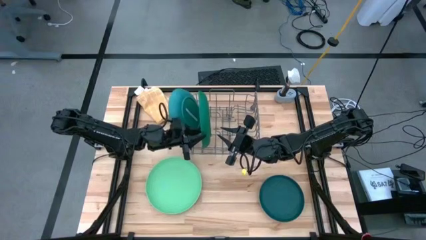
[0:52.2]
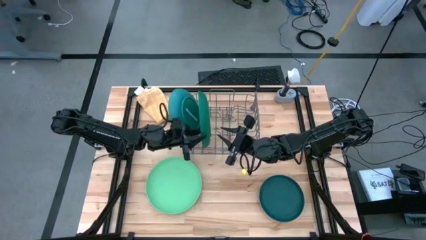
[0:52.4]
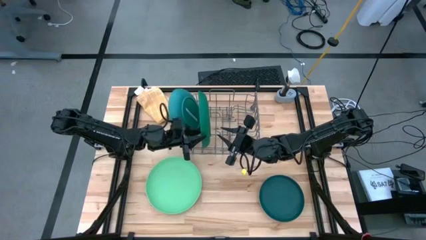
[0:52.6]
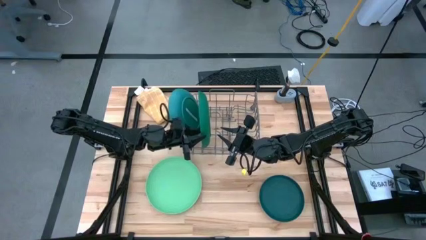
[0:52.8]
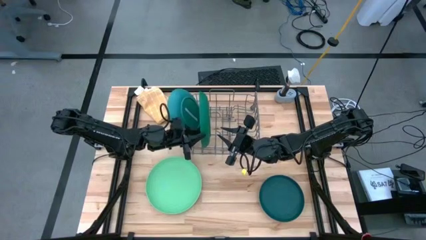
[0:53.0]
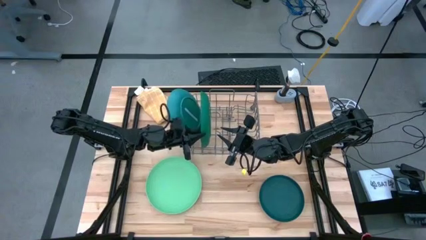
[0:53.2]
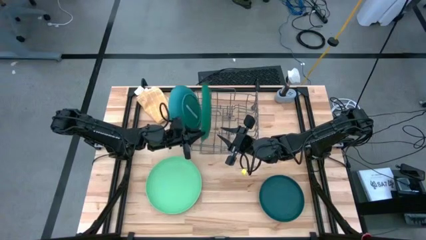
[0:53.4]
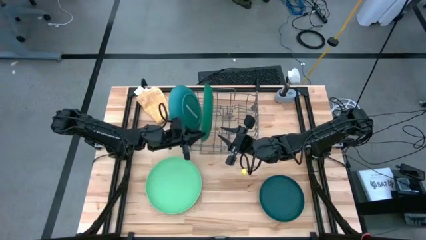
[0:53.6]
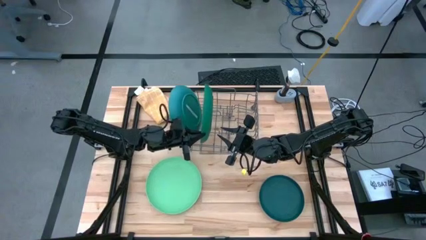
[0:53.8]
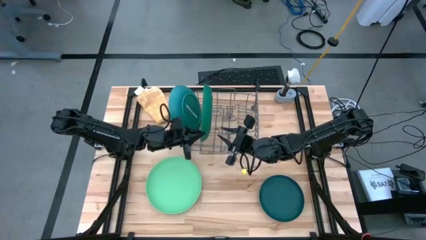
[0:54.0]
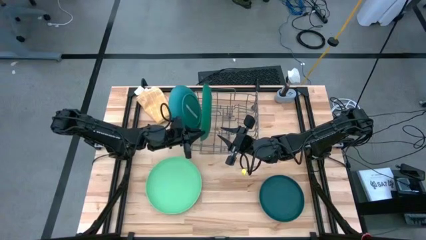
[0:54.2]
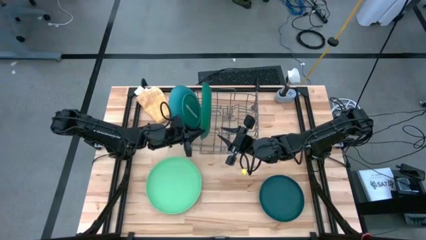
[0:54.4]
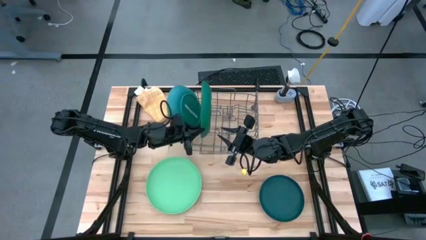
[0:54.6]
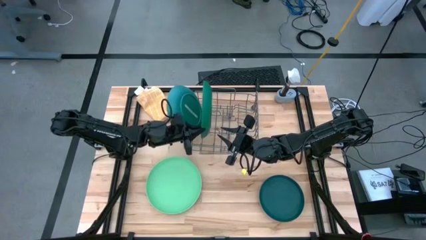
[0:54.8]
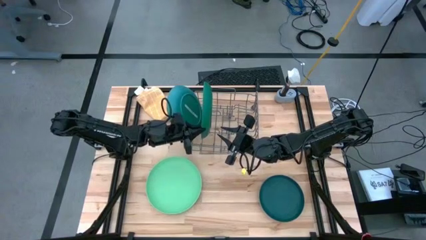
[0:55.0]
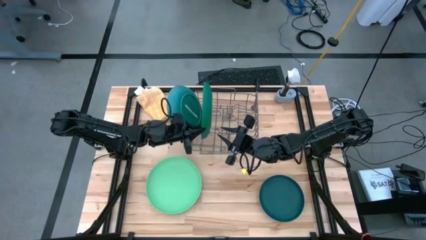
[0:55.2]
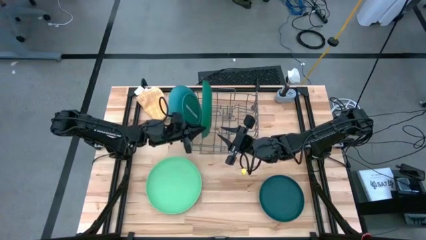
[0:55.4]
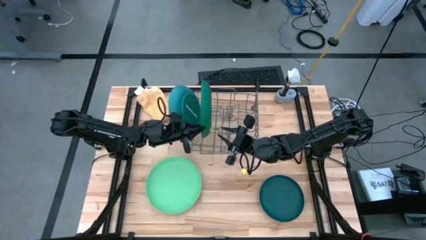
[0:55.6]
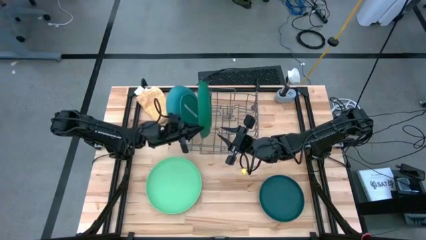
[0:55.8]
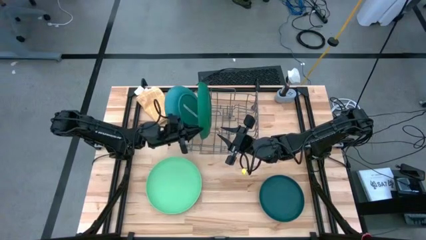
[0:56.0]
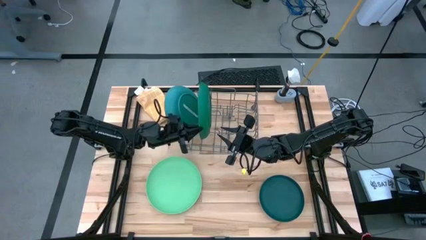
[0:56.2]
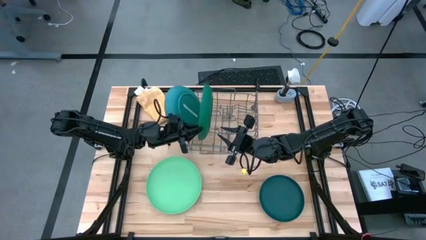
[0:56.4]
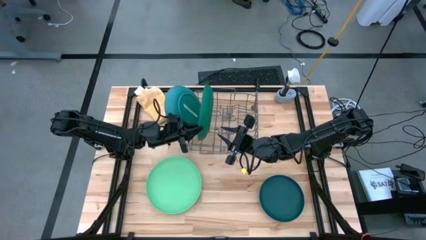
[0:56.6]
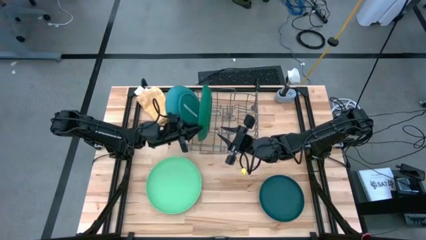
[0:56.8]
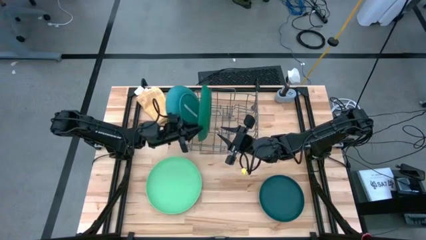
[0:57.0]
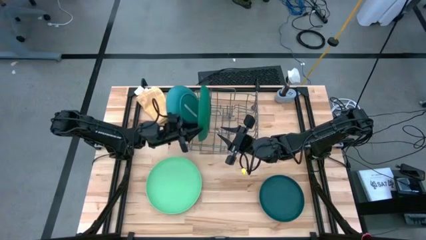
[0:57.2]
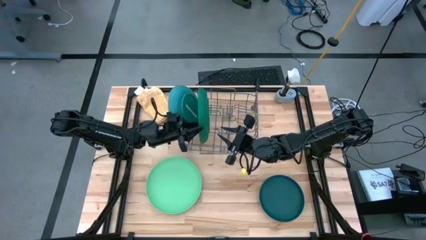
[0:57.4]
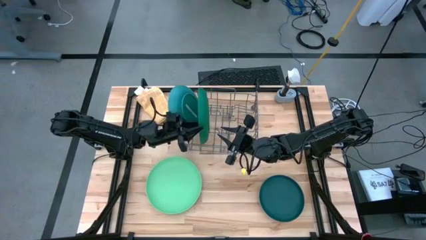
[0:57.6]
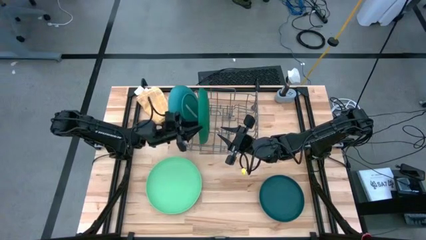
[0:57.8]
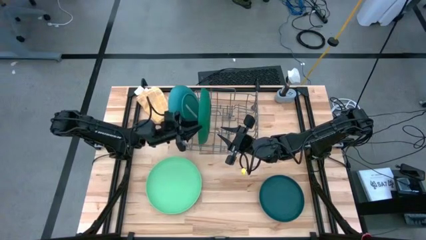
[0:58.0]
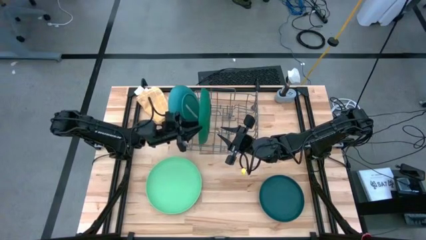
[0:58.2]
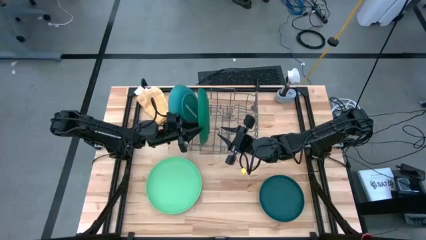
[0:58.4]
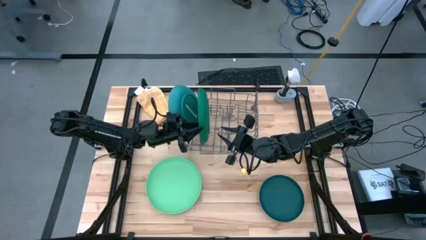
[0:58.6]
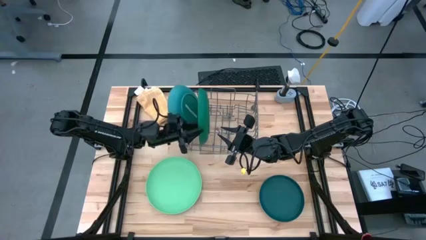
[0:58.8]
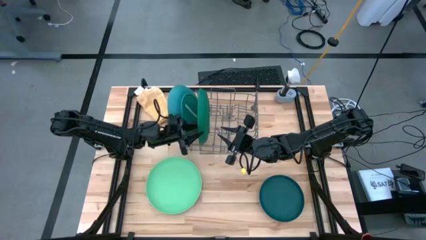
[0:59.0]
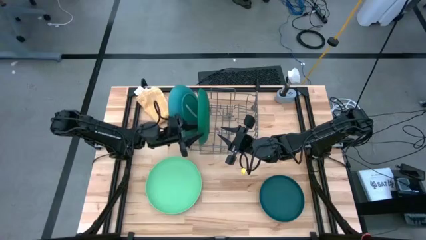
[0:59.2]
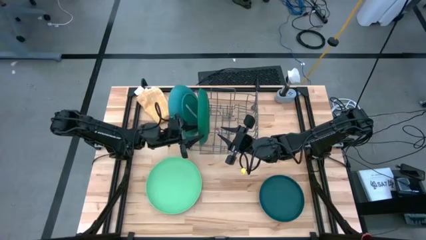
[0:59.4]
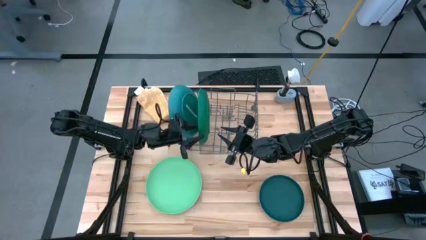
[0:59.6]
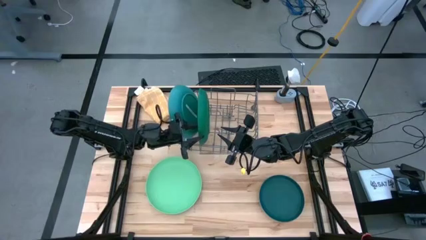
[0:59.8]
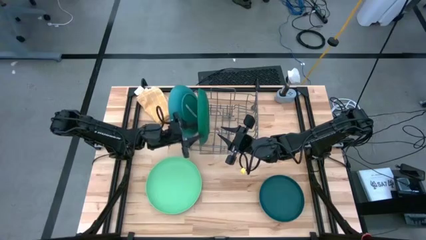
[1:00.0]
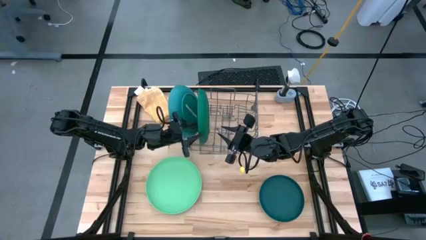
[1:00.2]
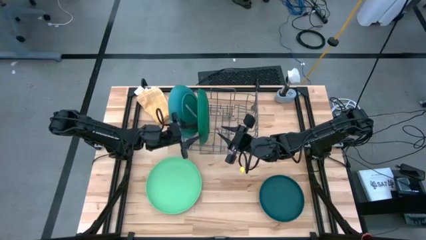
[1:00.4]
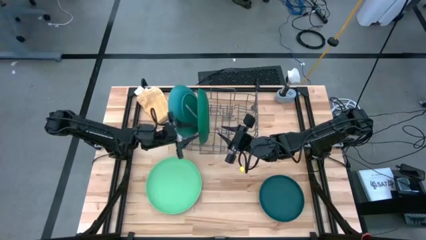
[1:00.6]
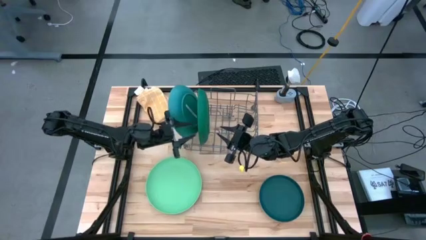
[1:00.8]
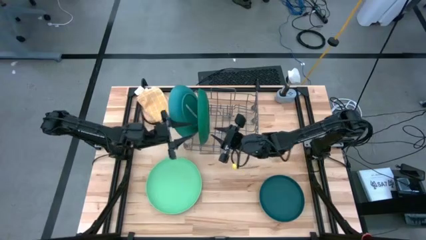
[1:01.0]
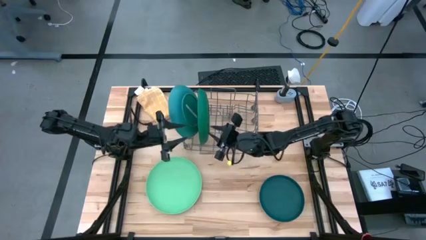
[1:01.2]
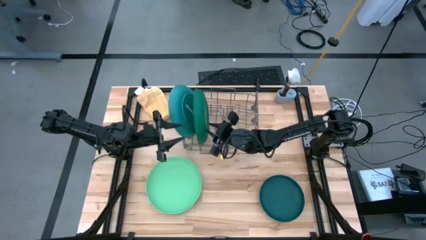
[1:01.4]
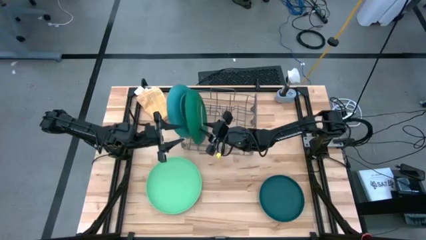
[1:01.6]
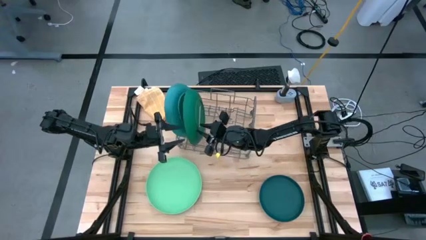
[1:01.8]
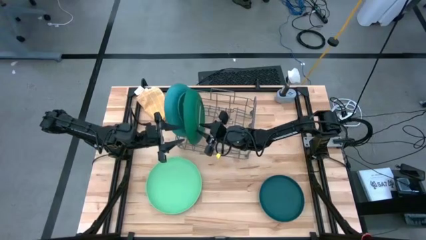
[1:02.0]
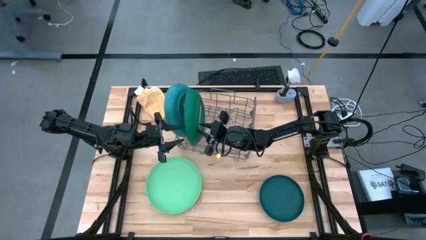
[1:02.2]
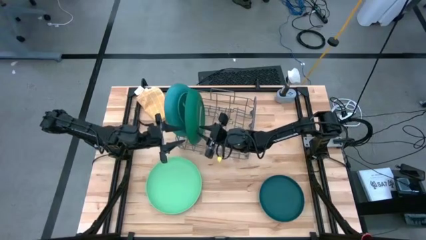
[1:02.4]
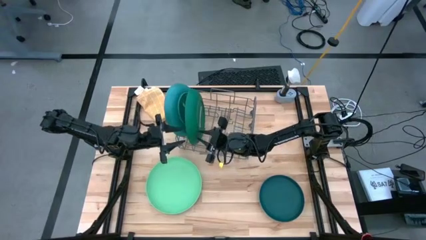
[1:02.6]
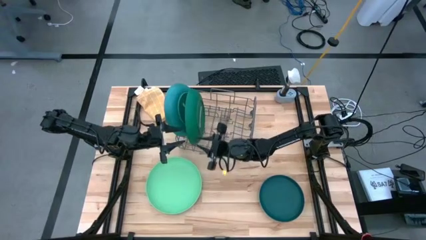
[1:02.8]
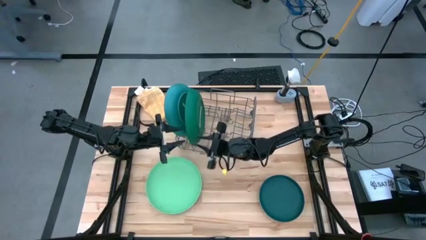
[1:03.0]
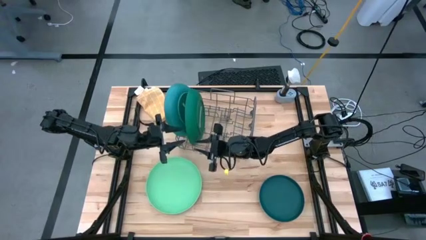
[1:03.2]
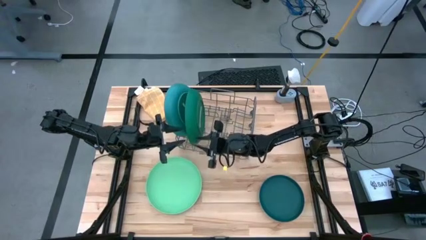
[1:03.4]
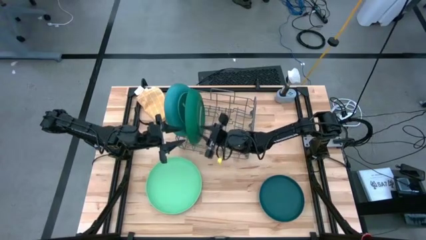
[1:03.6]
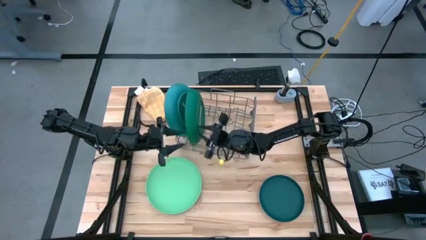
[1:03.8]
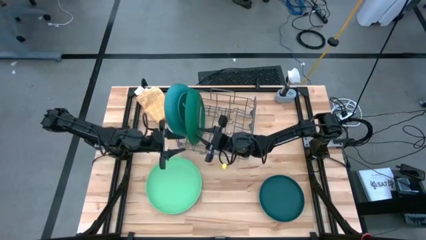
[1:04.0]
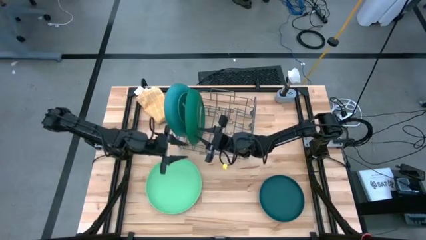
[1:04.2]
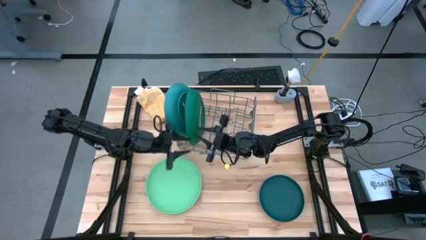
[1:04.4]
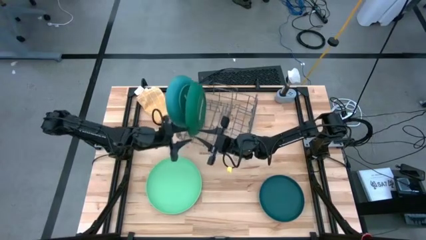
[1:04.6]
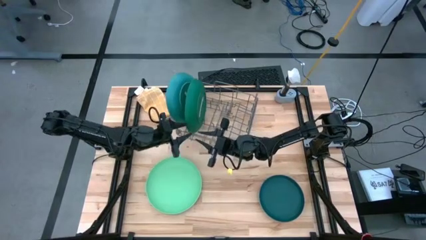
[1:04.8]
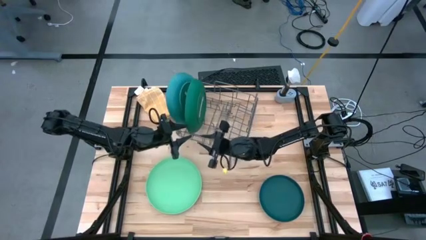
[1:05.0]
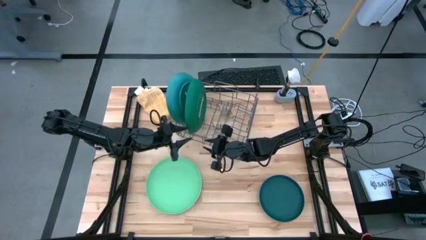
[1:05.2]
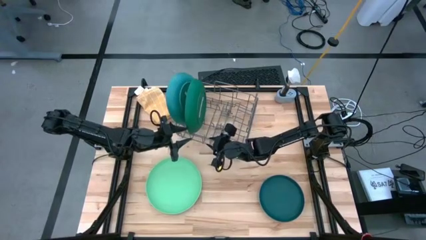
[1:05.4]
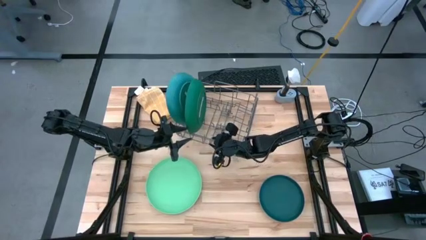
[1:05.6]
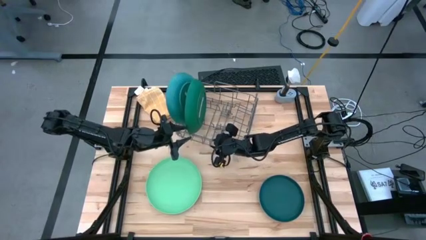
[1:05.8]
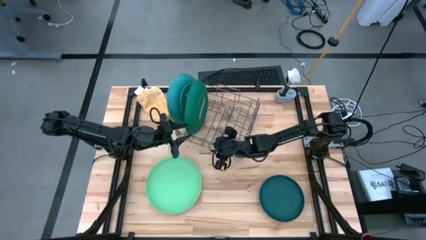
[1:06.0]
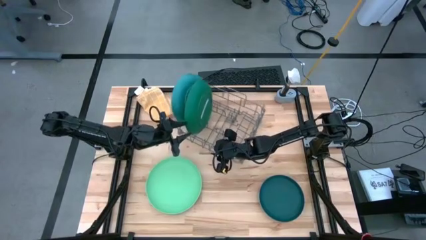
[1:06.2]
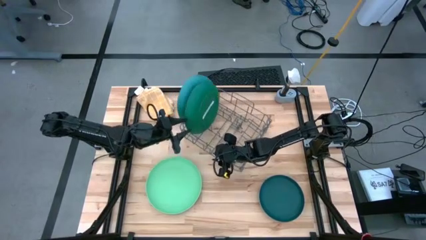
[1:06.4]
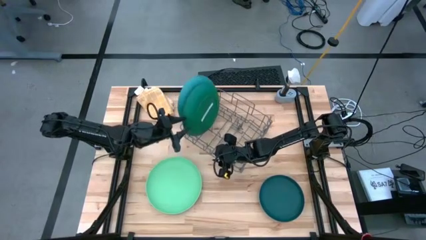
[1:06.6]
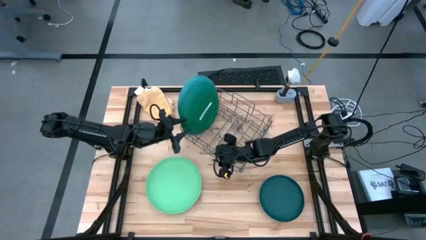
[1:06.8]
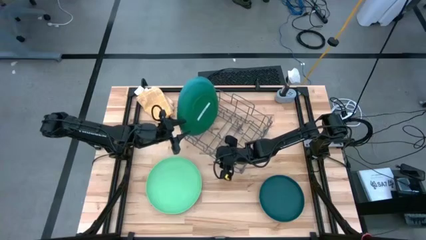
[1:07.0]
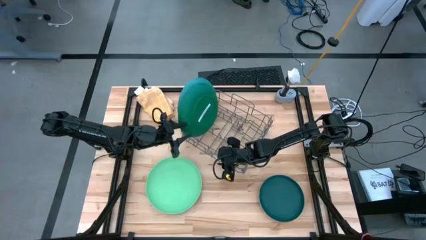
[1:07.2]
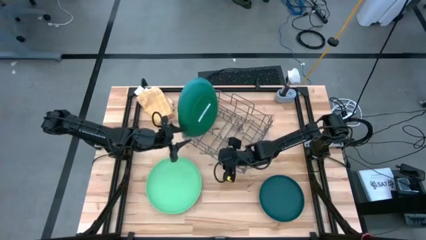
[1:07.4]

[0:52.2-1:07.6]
Task: Sort dishes
Put the green plate into the dishwasher rack
